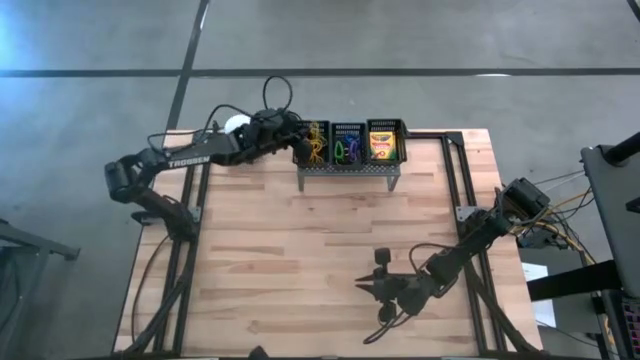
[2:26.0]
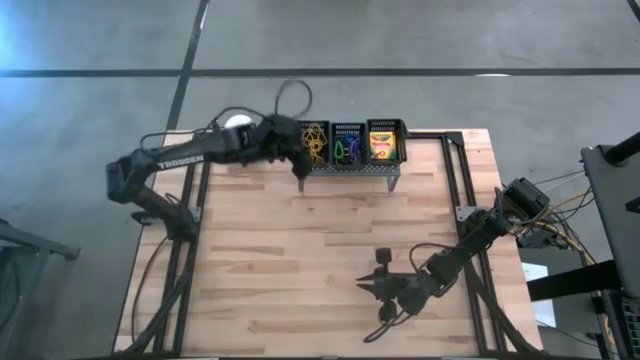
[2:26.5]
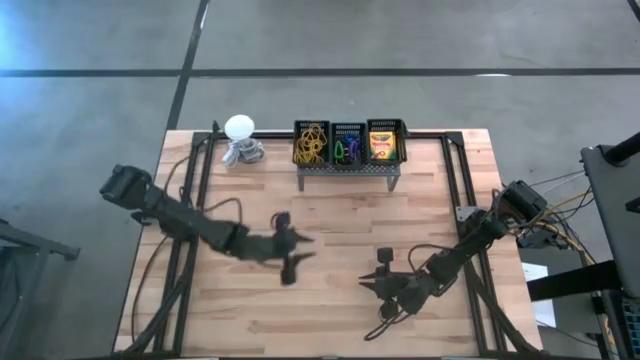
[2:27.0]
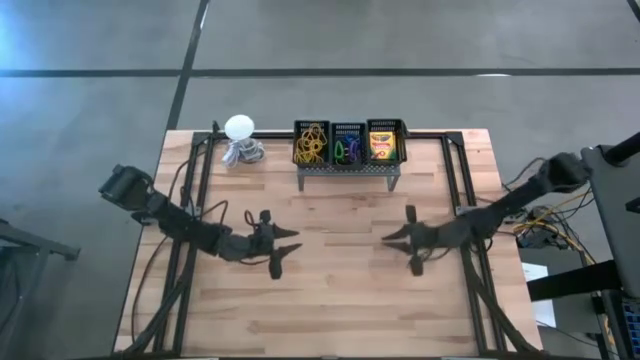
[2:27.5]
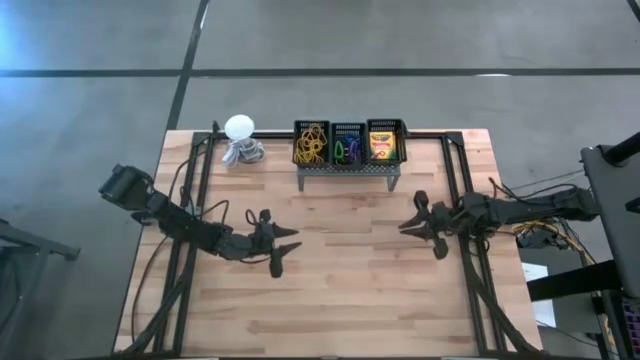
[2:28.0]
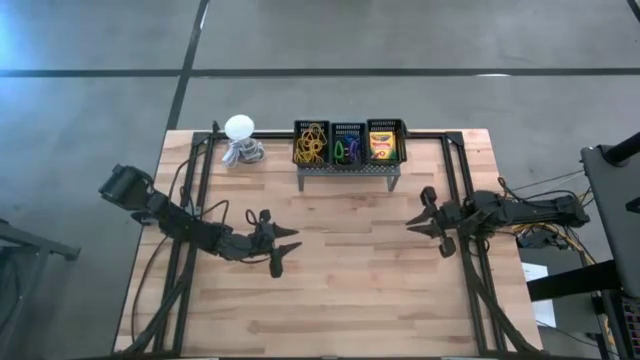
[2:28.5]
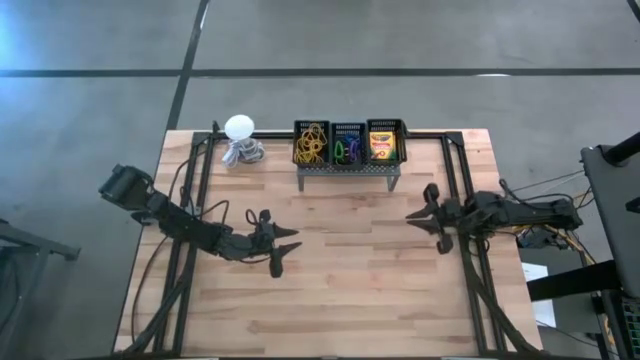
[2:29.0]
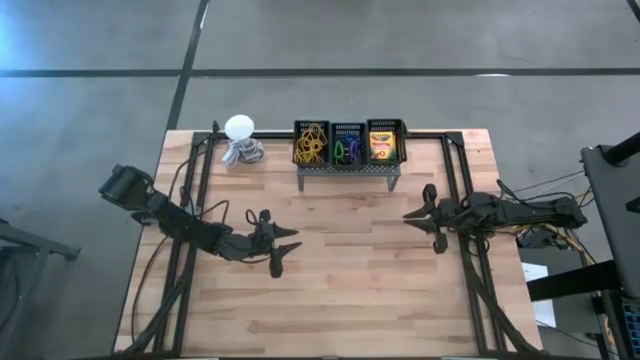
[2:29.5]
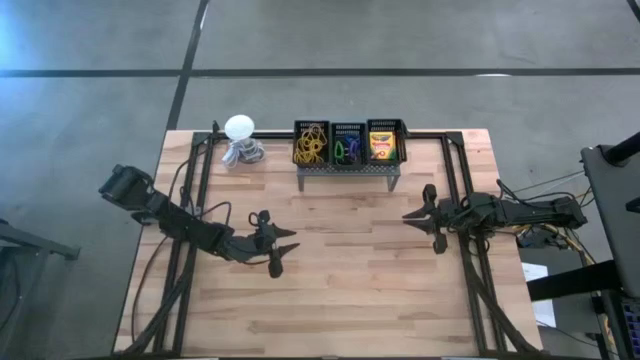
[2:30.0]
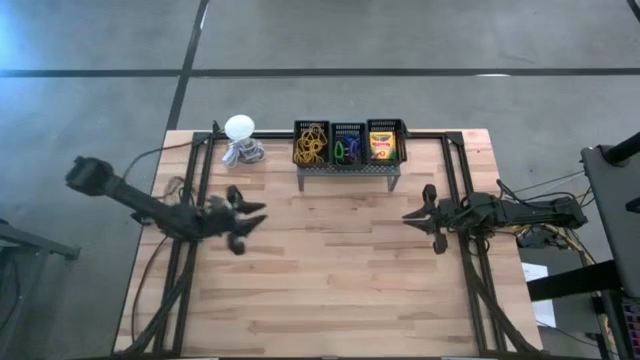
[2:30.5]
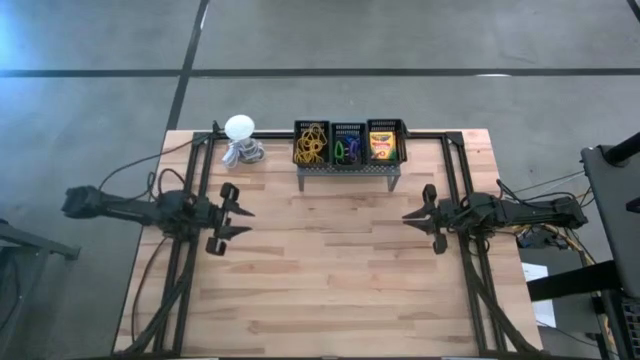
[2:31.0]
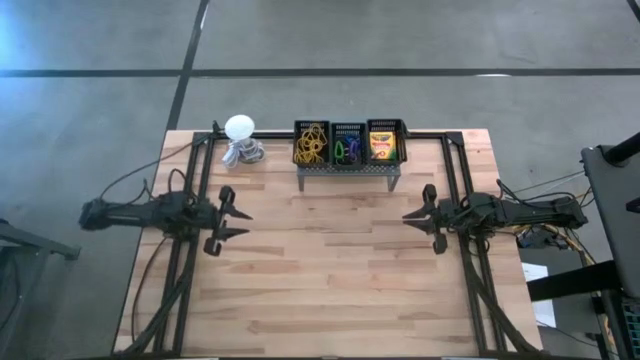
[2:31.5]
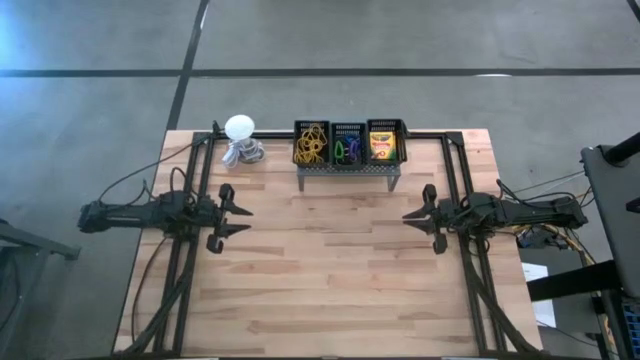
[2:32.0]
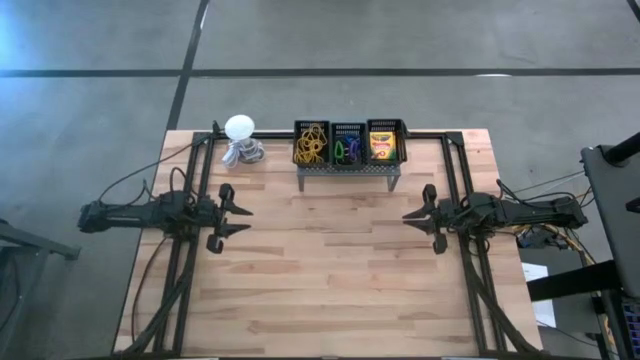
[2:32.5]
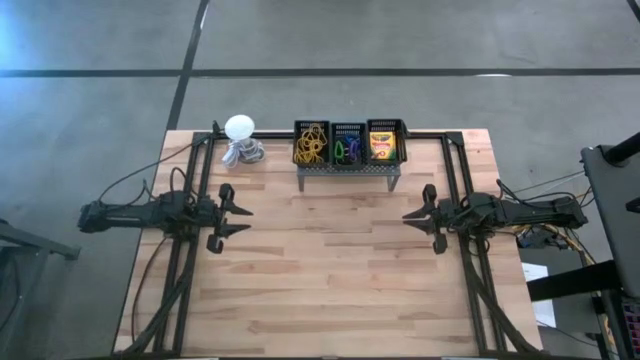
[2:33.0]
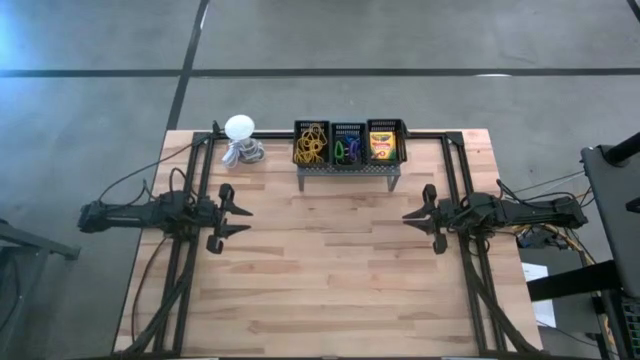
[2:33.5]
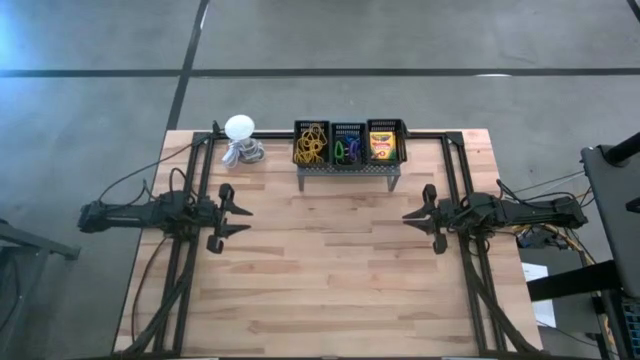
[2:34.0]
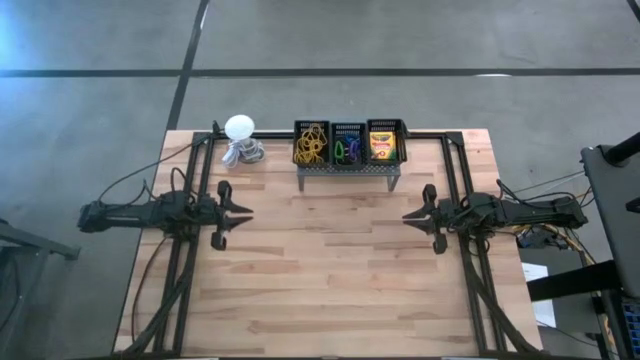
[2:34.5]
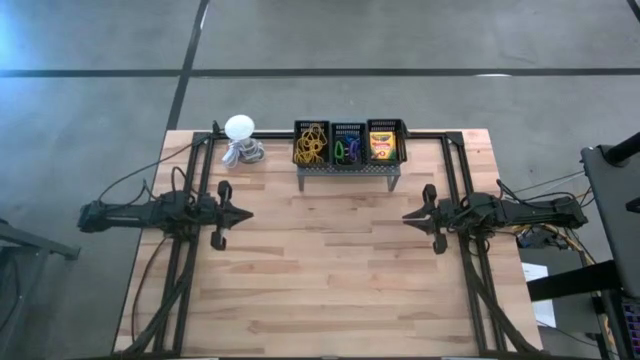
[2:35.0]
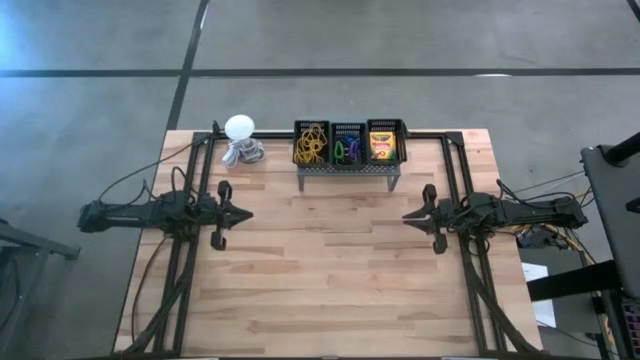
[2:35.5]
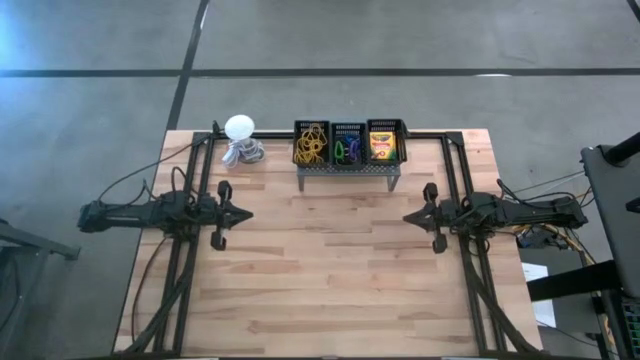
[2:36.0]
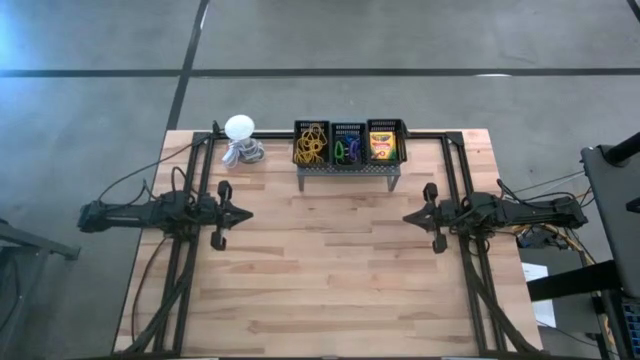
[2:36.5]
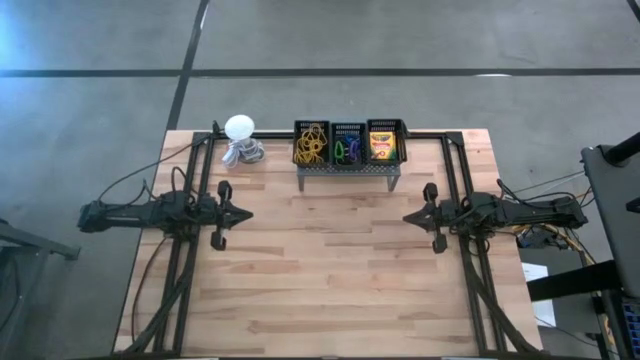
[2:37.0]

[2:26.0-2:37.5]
Task: Pick & Place Office Desk Supplies
Return To Home Position

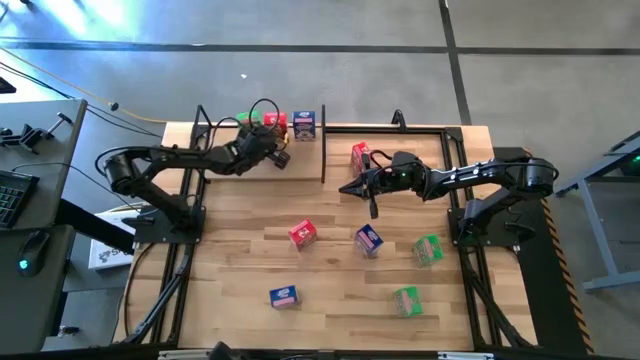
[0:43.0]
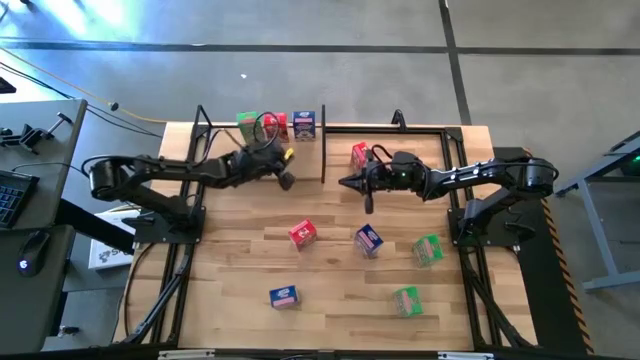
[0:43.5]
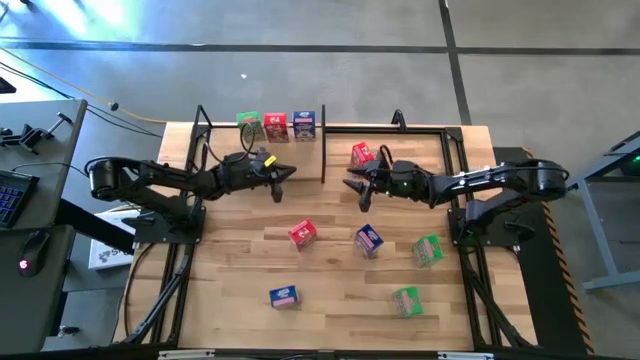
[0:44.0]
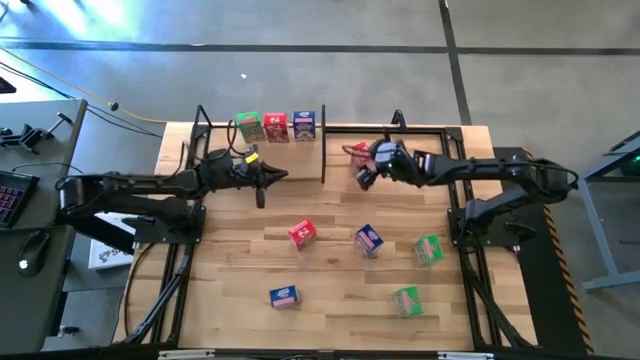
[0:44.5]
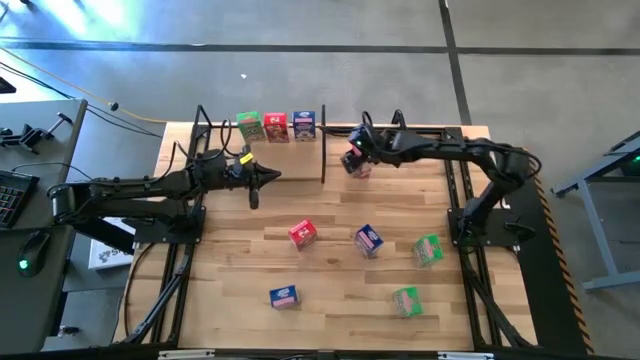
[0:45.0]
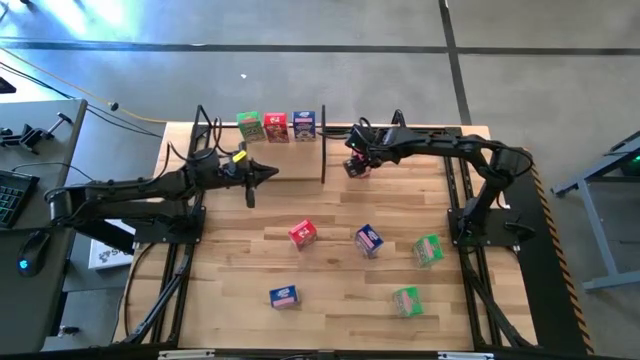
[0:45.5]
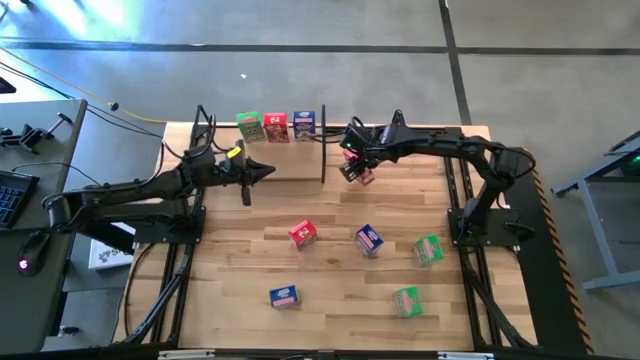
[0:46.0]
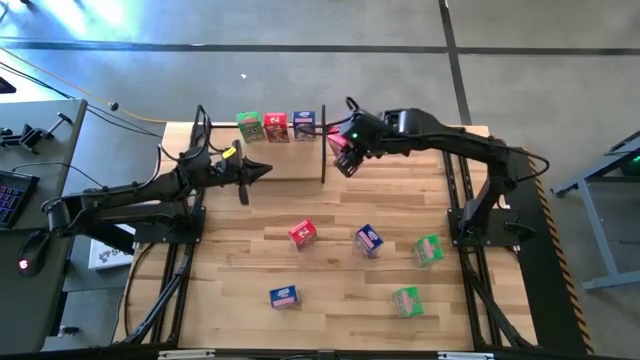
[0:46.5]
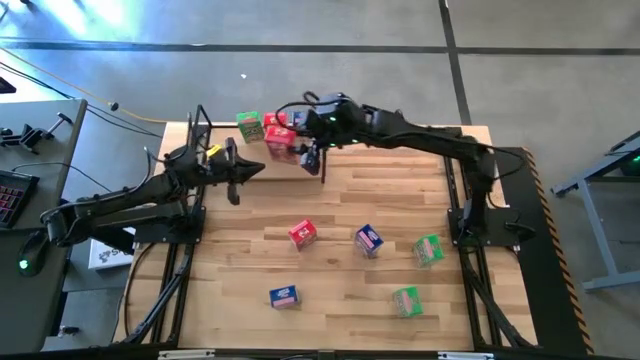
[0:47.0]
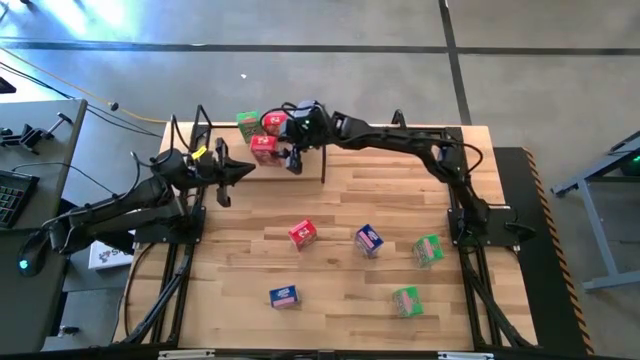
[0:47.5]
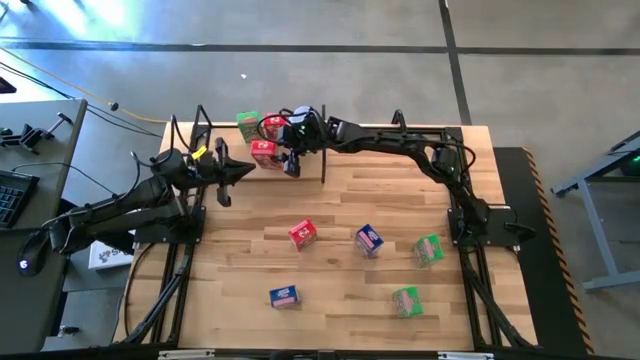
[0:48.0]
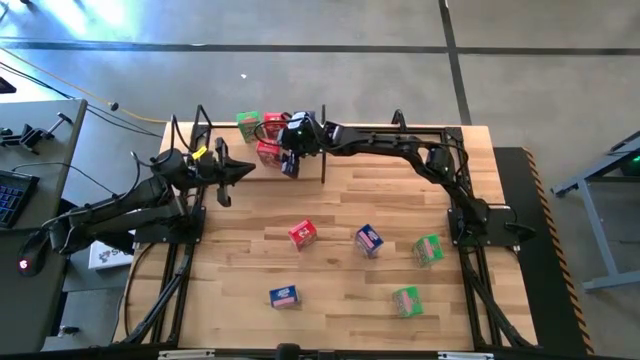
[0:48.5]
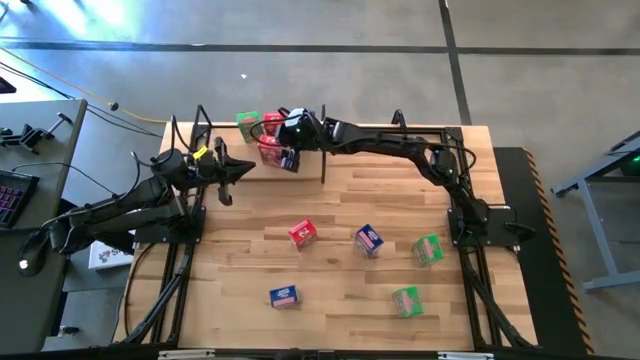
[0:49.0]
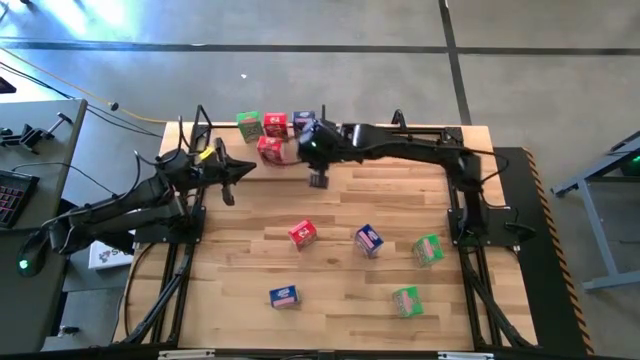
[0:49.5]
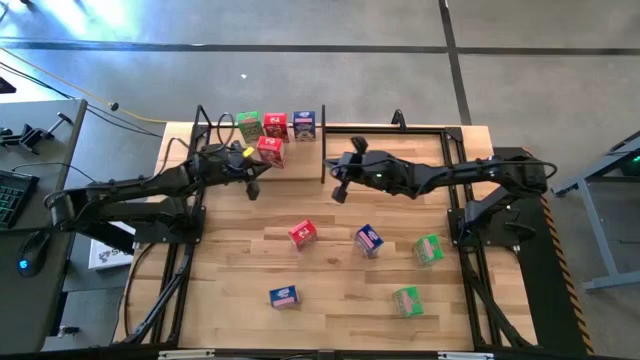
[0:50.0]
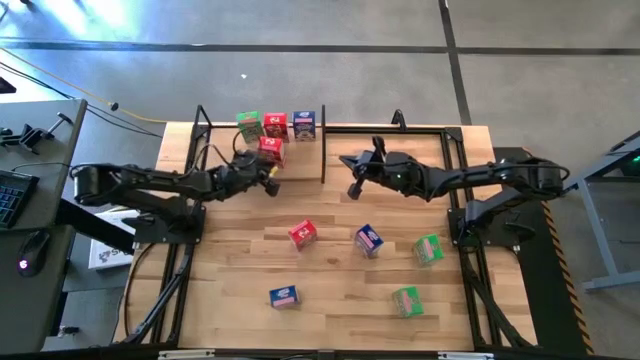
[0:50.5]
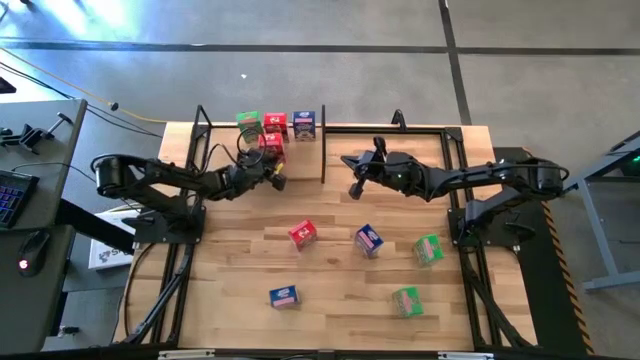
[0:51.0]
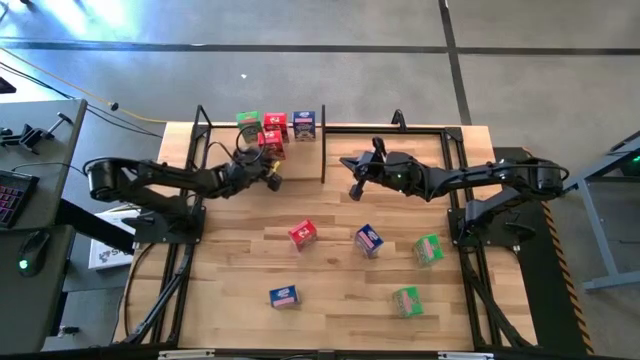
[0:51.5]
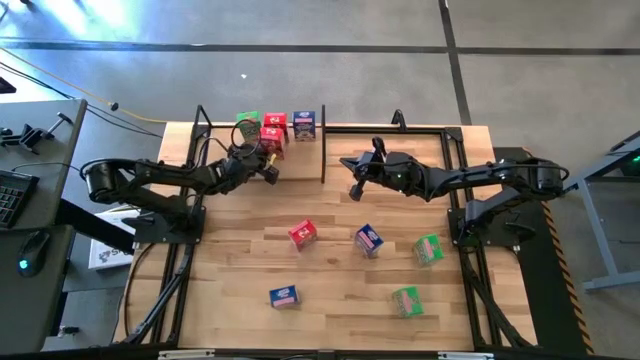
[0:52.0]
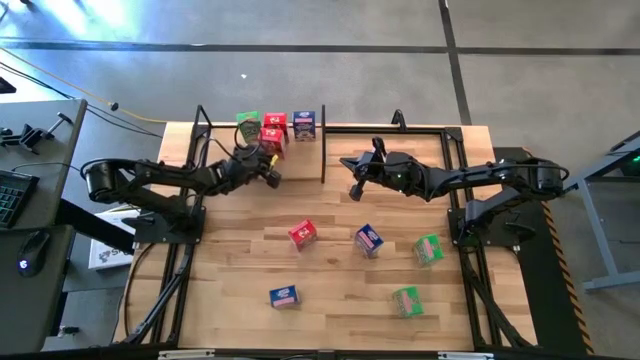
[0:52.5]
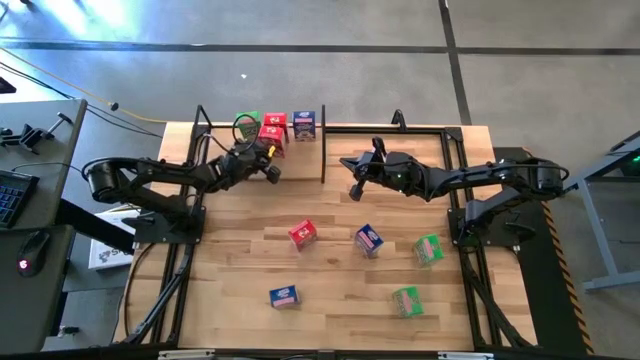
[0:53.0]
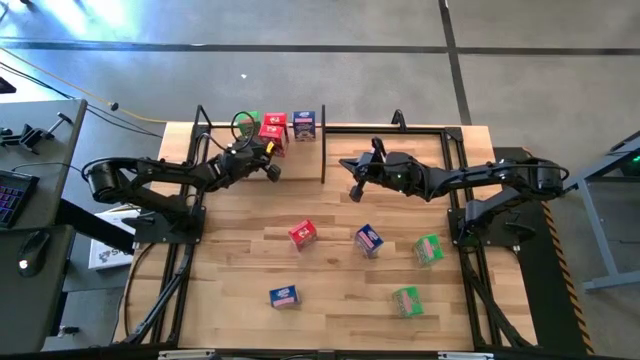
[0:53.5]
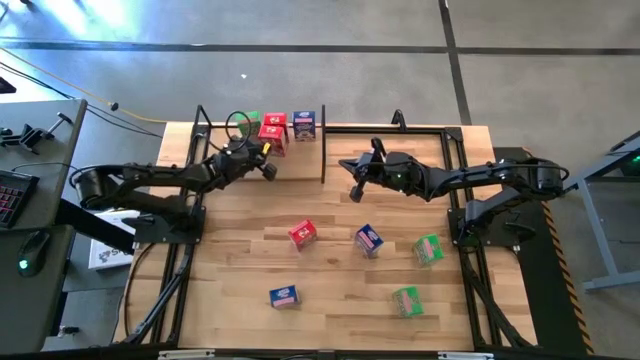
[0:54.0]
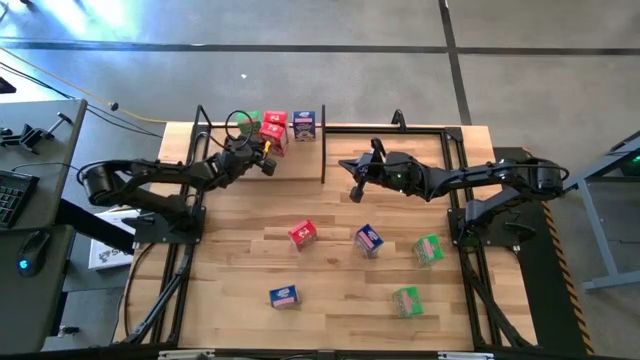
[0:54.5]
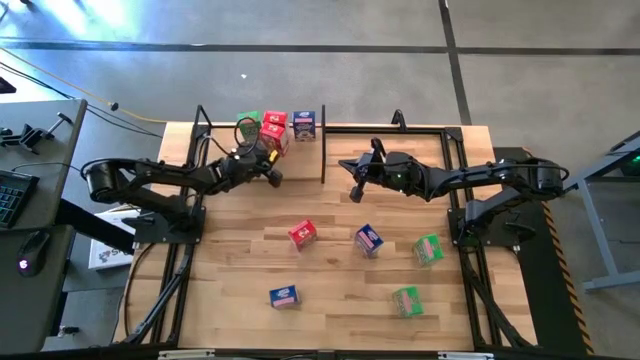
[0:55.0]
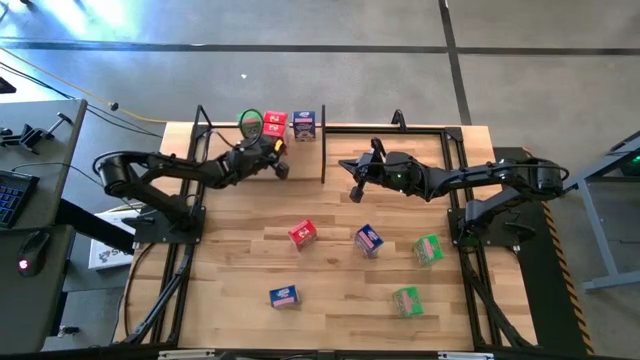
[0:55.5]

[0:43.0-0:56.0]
Task: Stack cereal on shelf
Put the top red cereal box on the shelf aligned with the red cereal box
